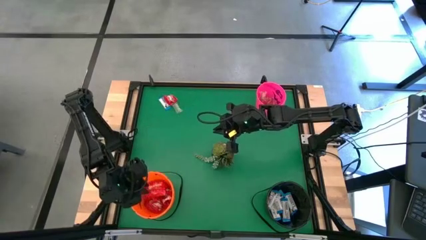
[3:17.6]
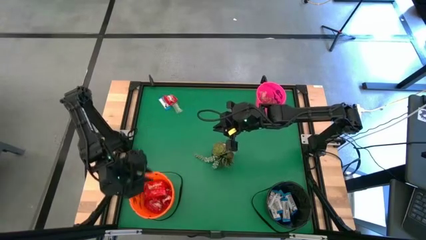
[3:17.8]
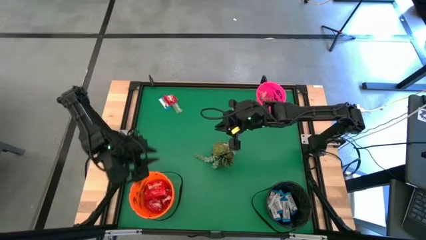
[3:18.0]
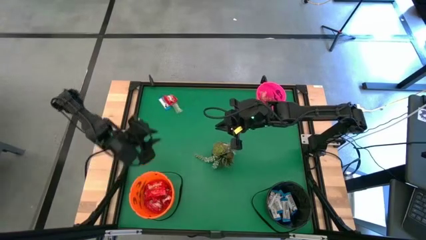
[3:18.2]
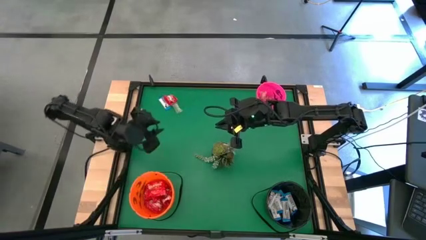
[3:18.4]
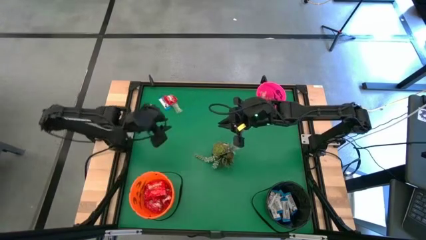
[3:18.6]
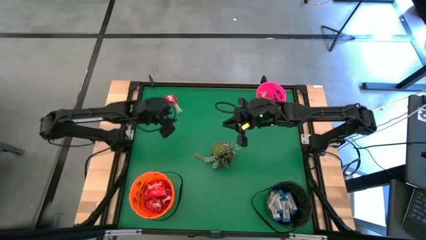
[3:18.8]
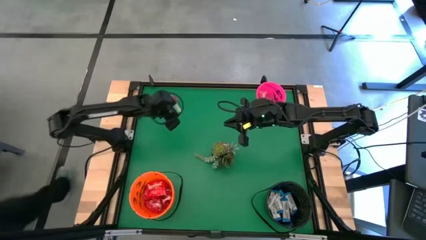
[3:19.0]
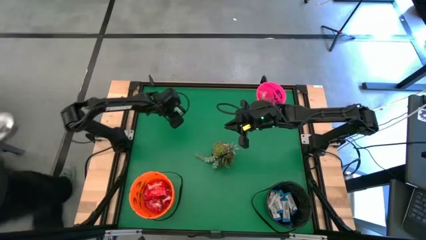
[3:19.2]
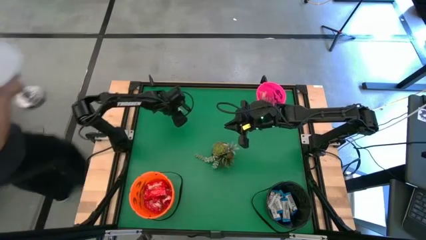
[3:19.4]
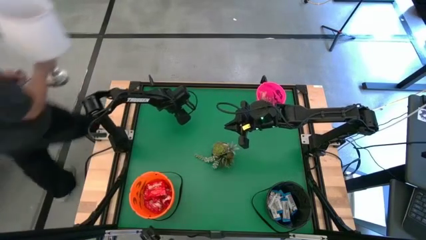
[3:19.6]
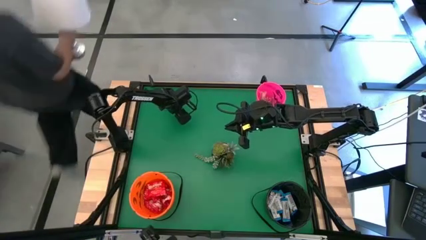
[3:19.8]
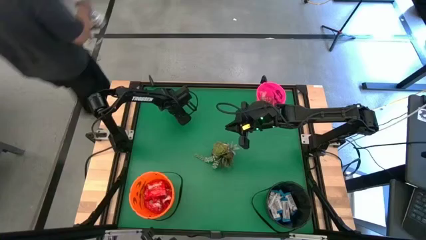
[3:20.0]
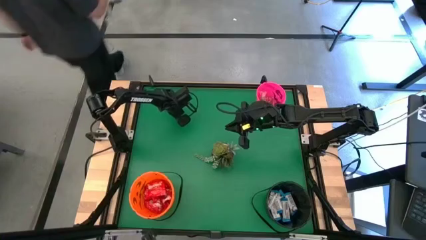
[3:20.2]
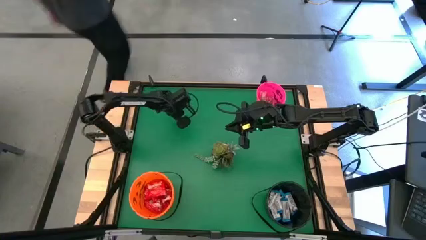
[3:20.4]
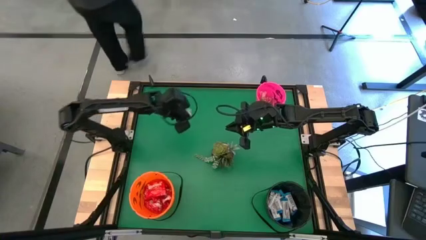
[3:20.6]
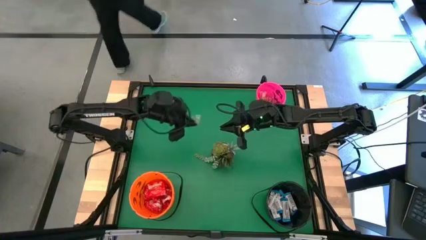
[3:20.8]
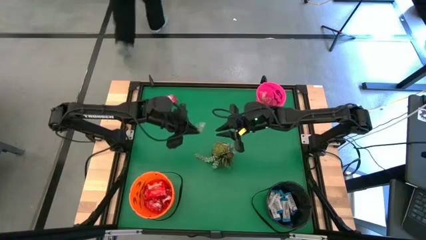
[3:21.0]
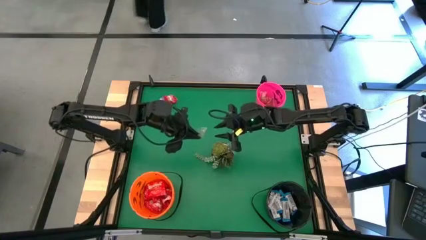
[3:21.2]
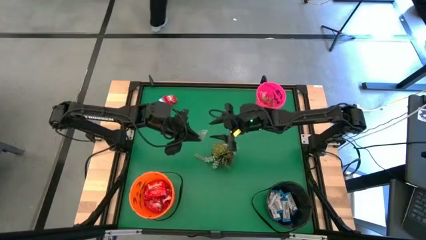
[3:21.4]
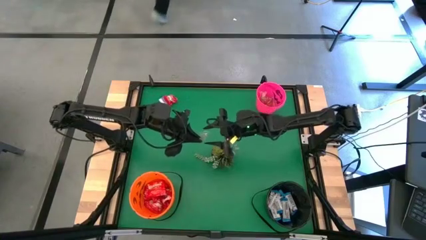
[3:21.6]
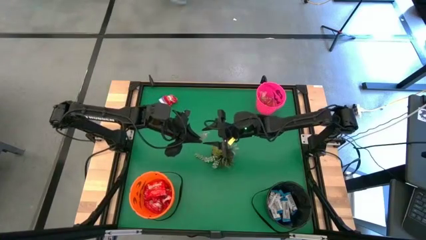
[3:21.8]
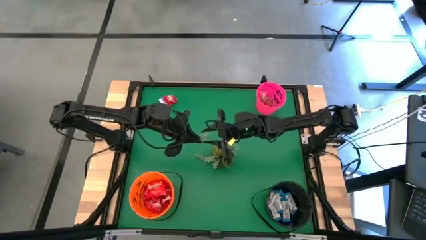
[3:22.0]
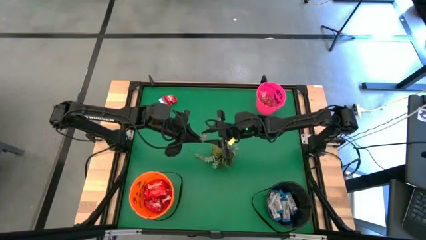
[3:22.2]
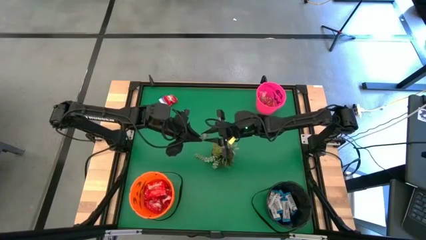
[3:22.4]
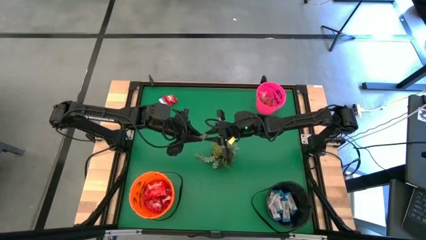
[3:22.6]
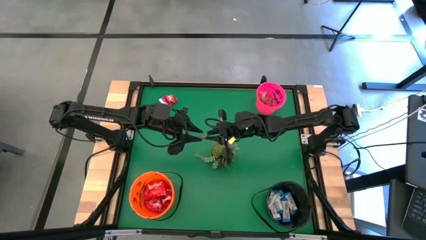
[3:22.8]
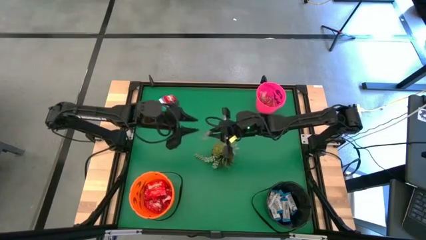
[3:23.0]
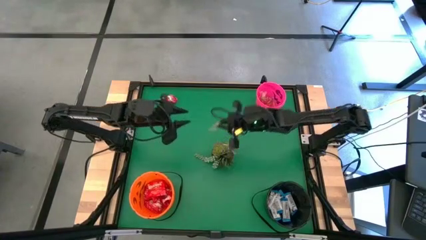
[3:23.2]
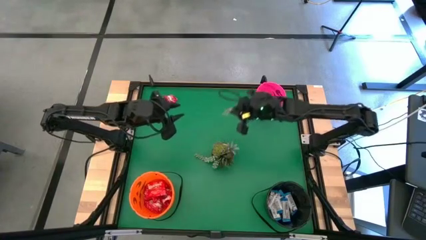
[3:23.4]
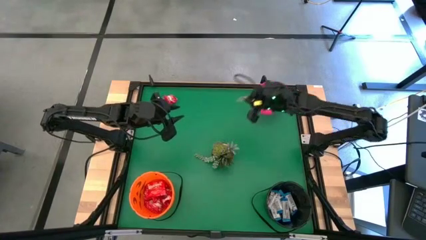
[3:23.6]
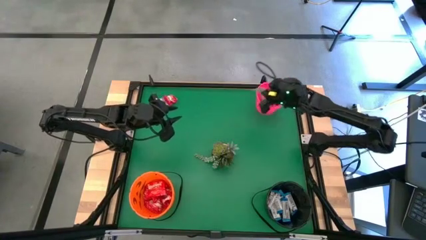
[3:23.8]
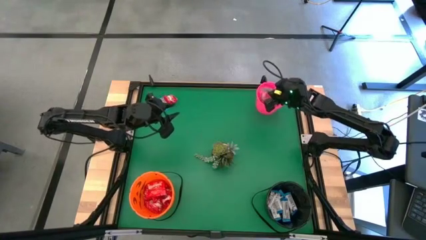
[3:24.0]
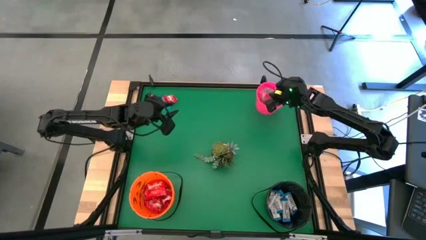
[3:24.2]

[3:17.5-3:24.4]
Task: Sort candy
Put the green gummy into the pink bucket

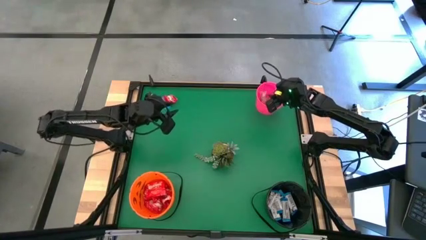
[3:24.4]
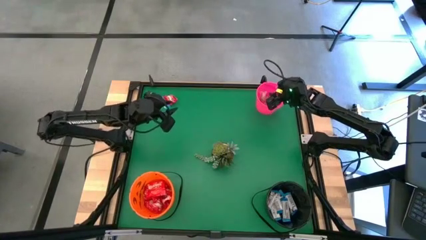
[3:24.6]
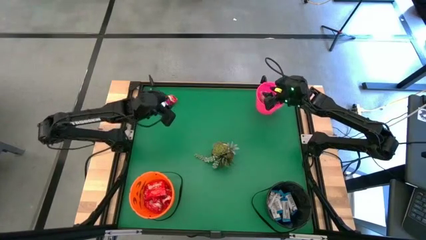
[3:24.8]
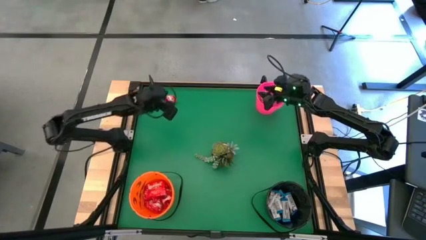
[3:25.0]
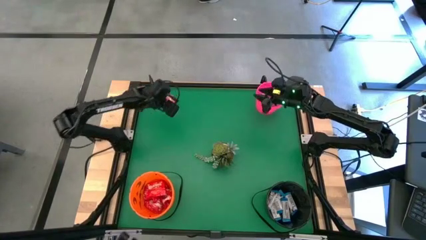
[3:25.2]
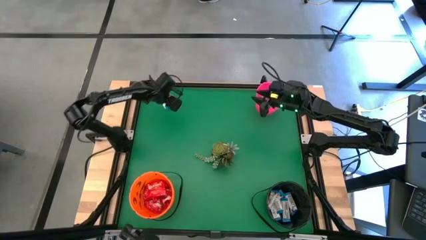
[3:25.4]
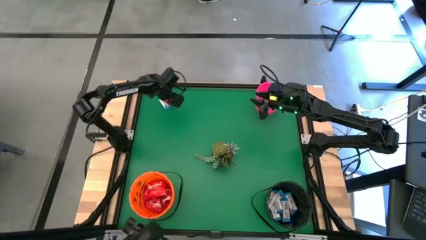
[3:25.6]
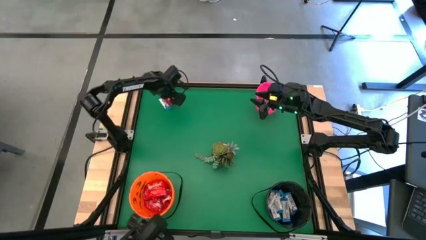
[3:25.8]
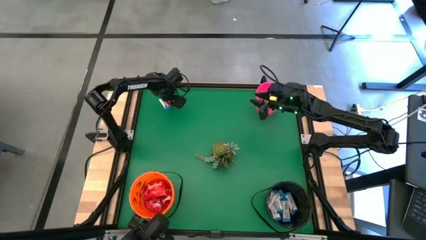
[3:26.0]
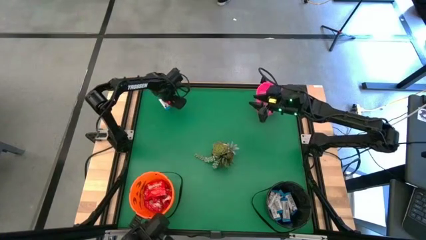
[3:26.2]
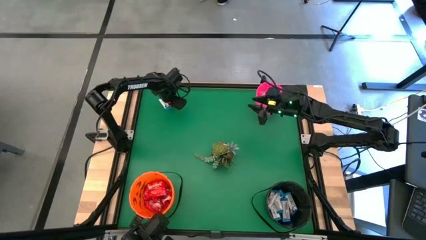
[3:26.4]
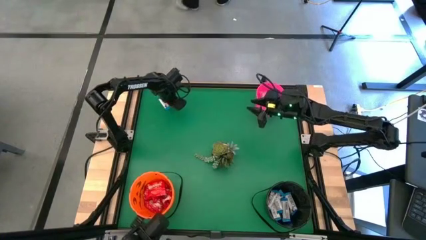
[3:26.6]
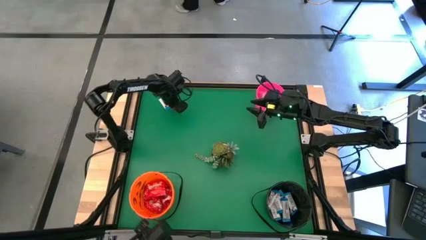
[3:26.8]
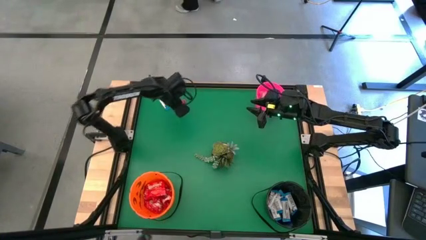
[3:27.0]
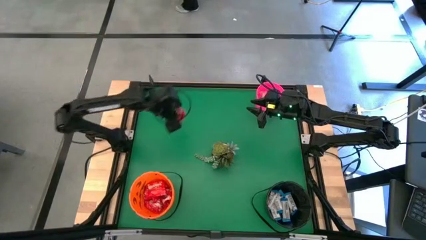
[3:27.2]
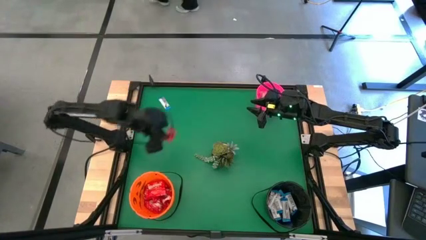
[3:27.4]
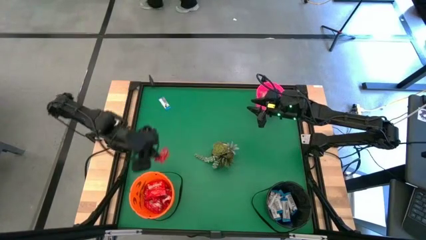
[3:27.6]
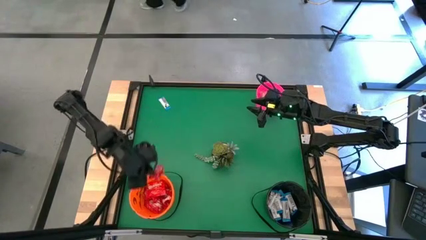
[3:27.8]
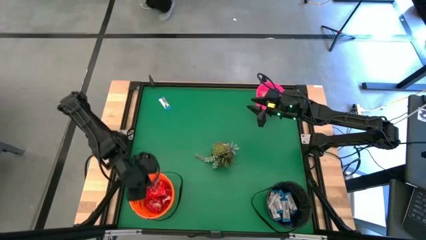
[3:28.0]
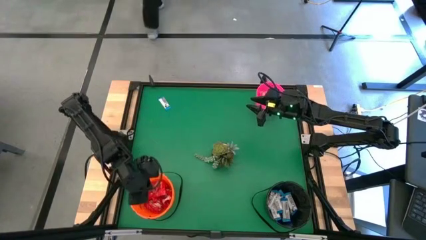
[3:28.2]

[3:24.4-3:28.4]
Put the red candy into the orange bucket

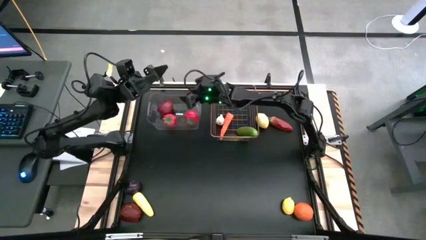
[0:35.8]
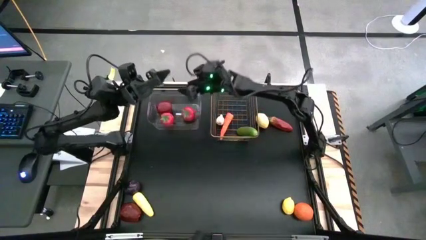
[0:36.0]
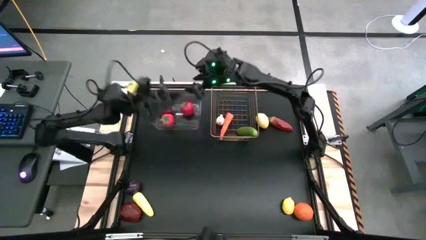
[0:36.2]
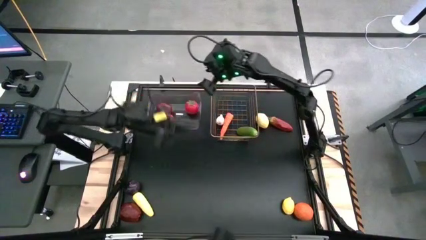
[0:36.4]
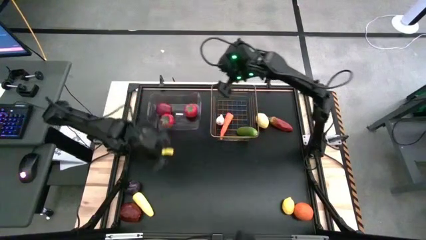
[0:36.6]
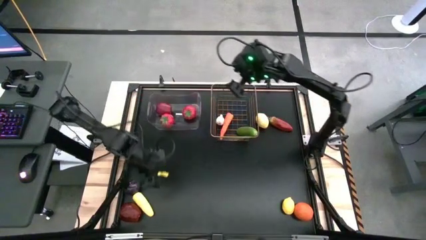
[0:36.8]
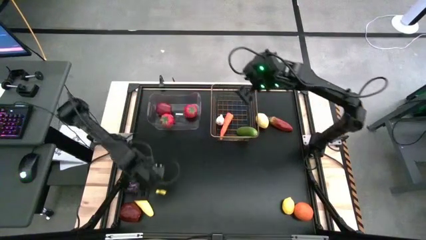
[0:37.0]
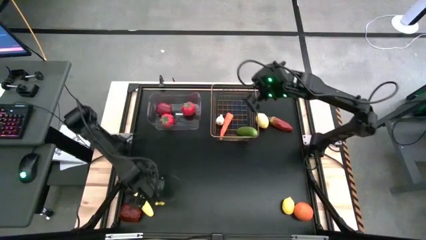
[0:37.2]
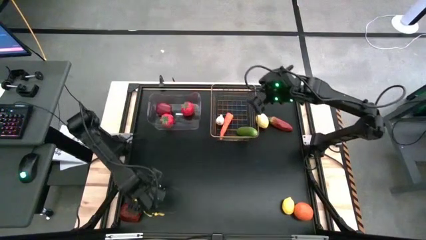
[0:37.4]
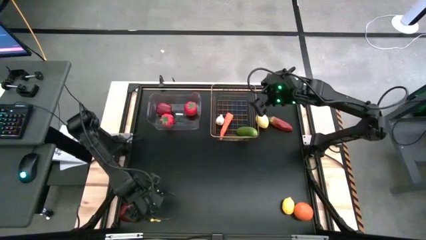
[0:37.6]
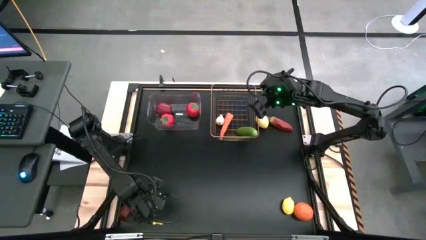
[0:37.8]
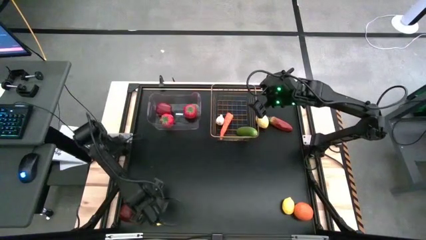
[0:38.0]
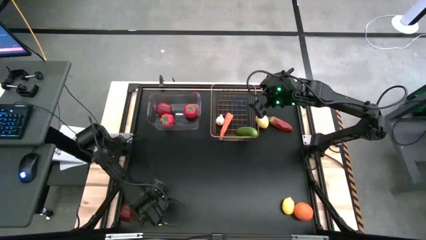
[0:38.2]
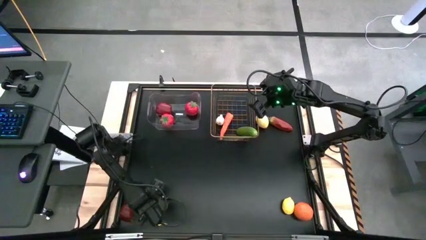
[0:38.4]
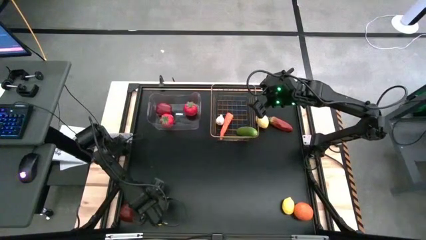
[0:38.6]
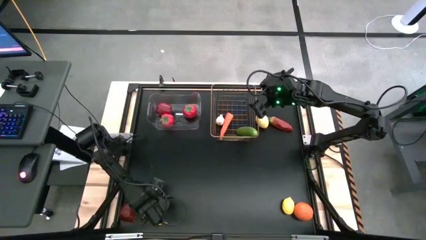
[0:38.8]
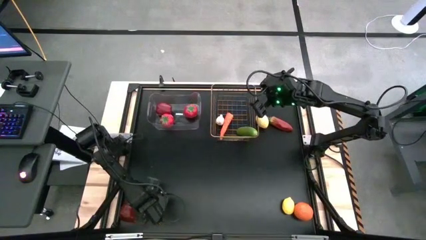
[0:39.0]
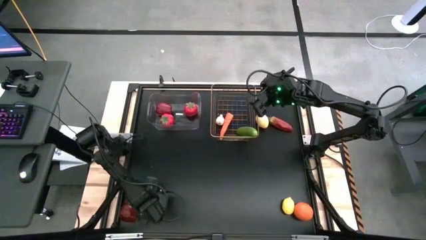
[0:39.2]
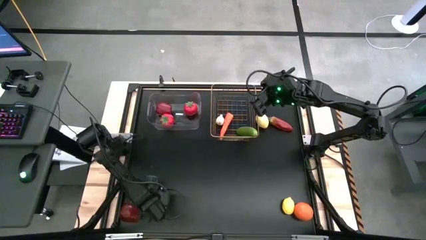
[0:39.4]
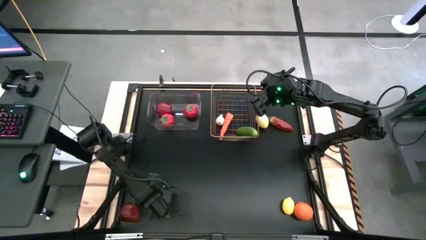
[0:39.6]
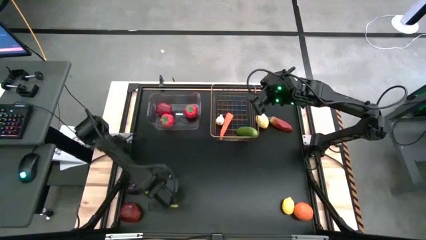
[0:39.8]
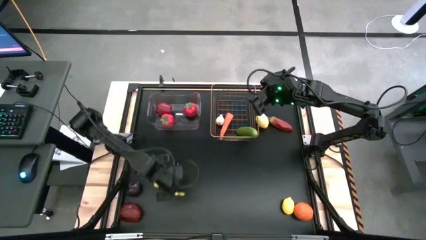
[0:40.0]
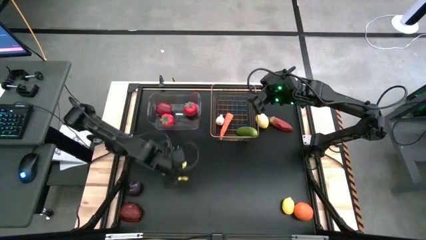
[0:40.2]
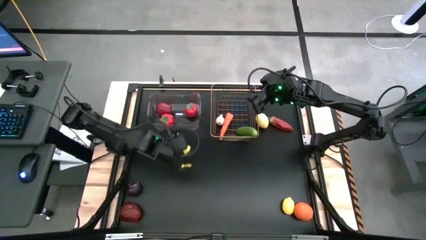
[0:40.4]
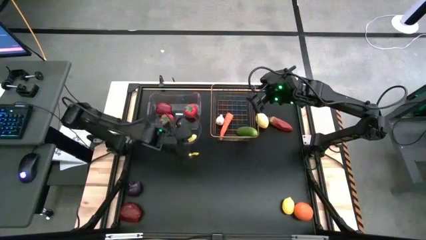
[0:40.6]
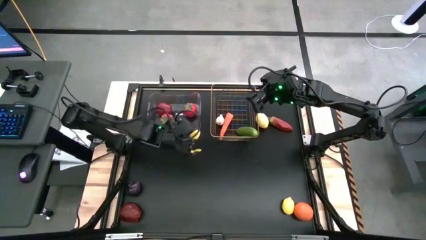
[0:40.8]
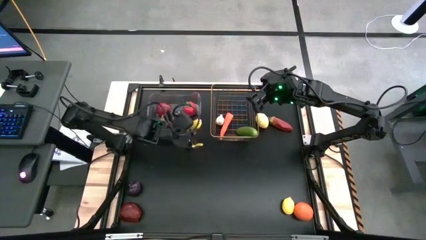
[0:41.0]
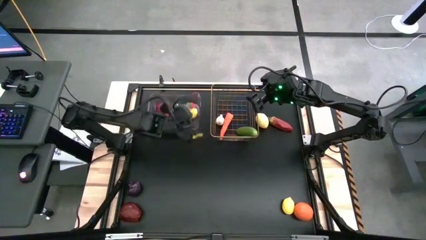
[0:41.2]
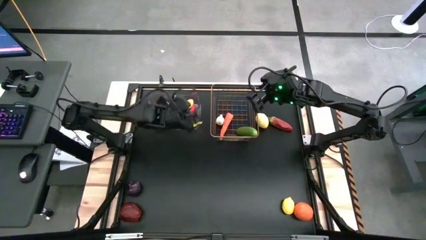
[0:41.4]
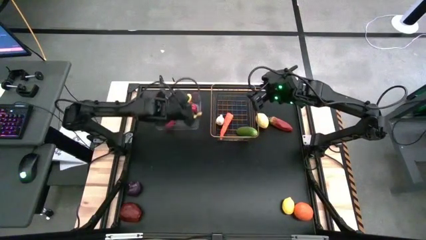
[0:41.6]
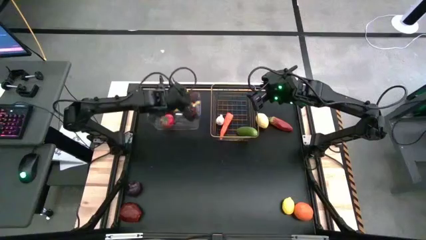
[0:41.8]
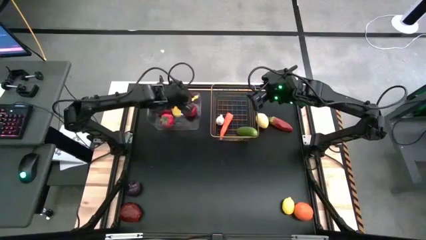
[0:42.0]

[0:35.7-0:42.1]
Task: Sort produce into baskets
Put the corn into the transparent bin

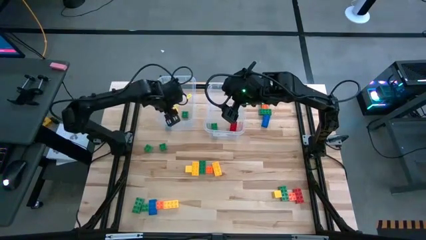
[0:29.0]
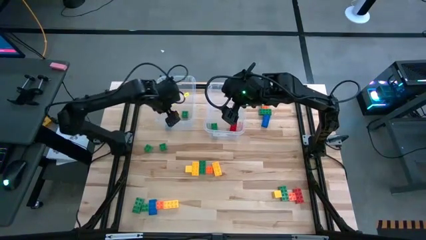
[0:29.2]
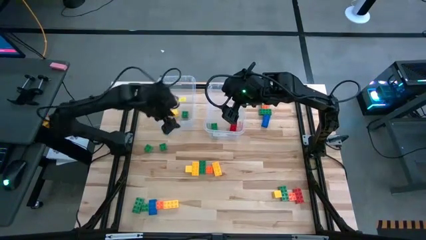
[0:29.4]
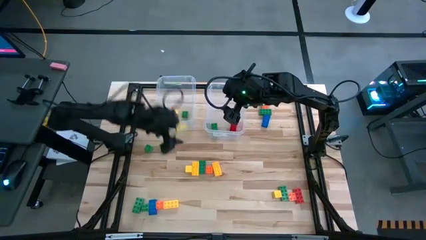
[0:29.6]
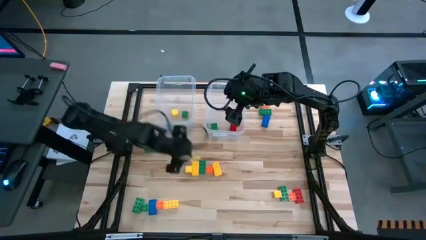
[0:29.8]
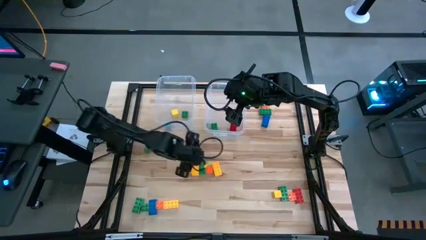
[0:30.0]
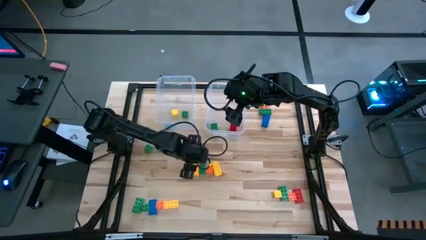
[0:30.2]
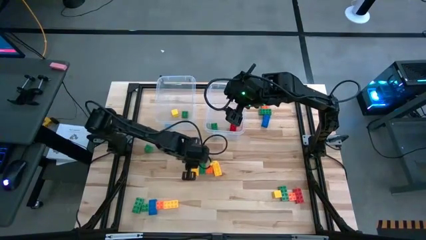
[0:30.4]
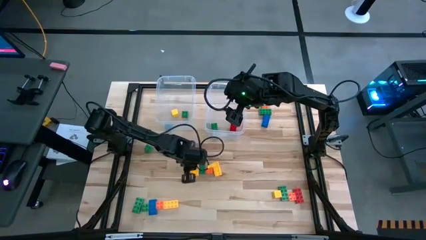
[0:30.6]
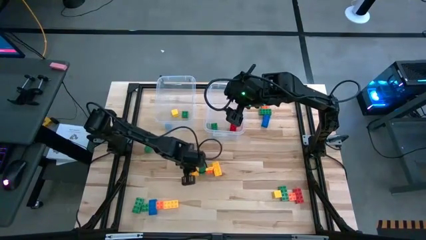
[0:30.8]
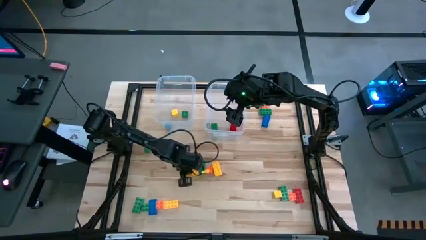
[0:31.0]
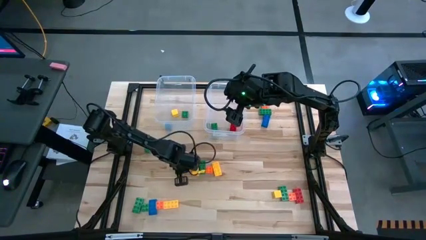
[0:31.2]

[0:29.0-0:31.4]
Task: Sort blocks by size
Adjust the yellow blocks
